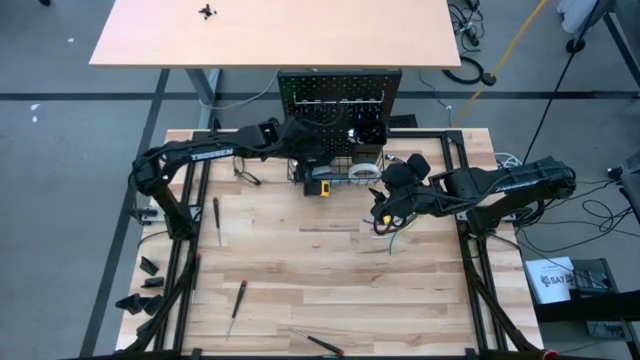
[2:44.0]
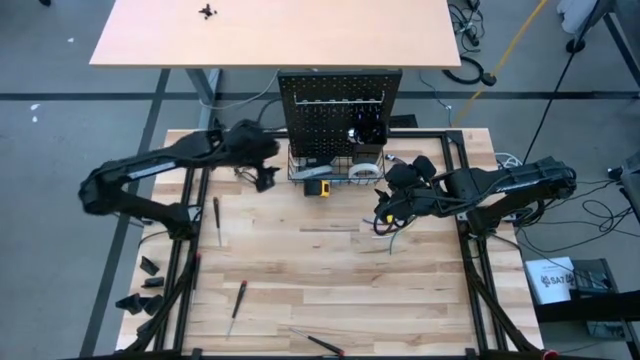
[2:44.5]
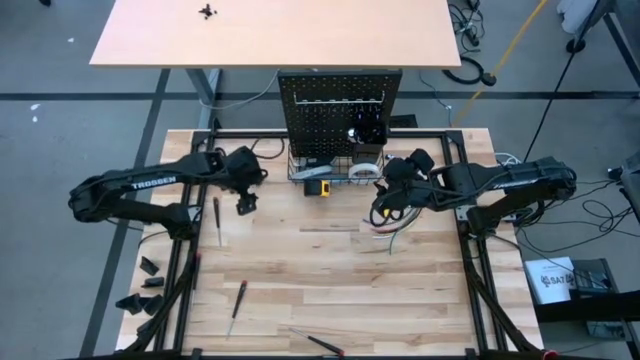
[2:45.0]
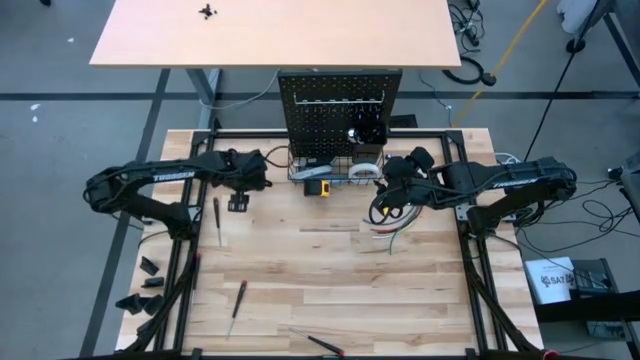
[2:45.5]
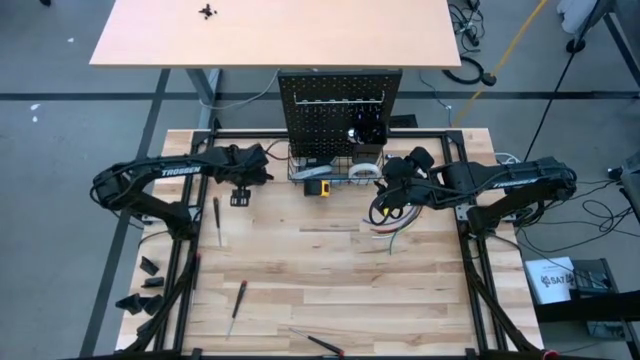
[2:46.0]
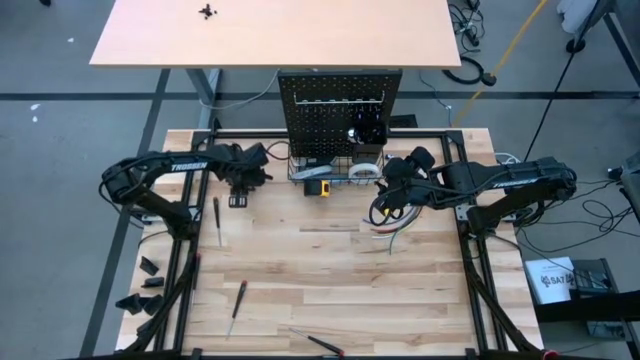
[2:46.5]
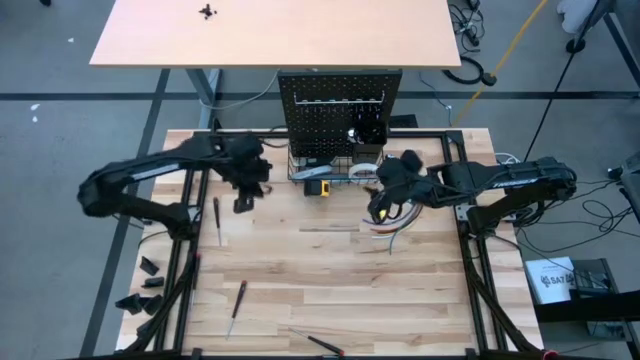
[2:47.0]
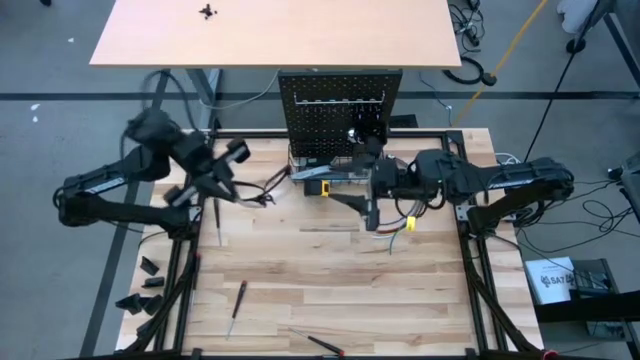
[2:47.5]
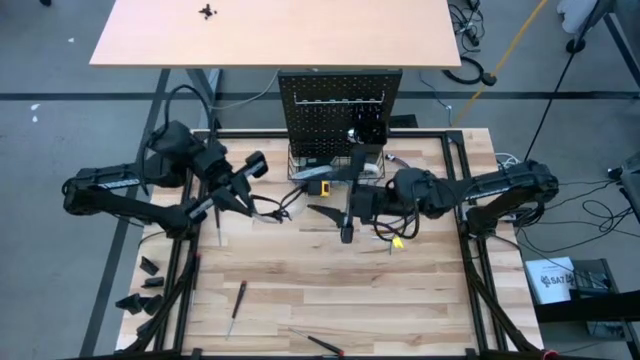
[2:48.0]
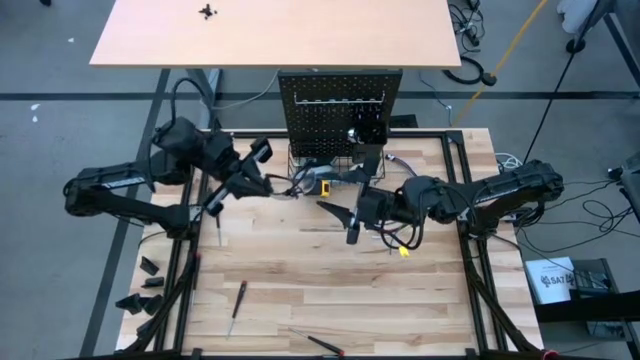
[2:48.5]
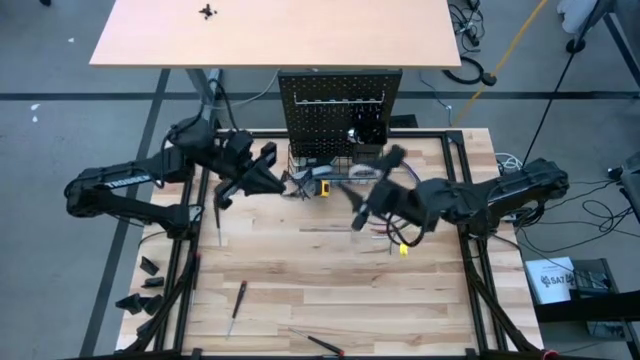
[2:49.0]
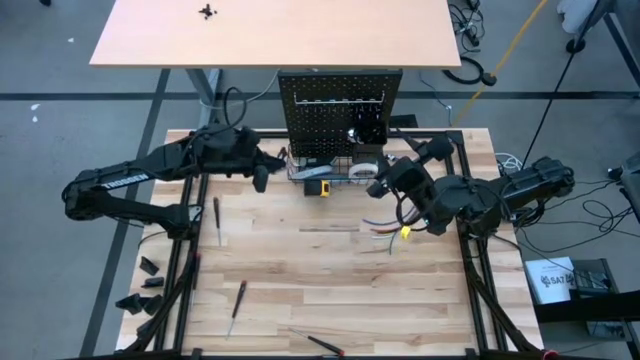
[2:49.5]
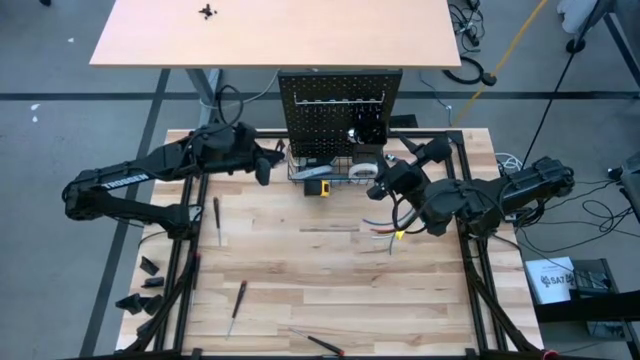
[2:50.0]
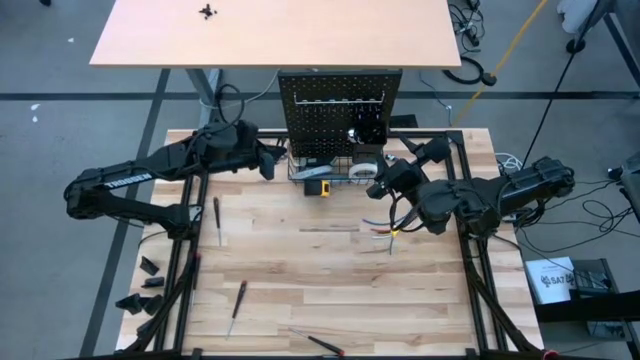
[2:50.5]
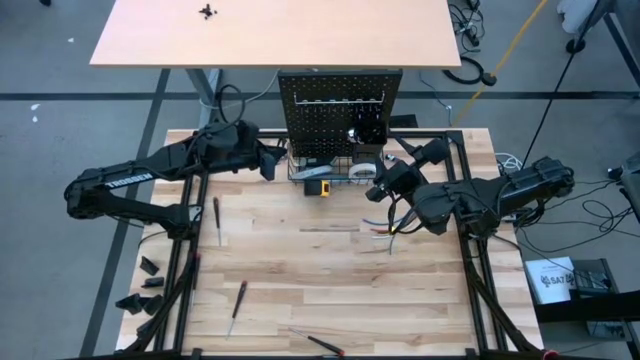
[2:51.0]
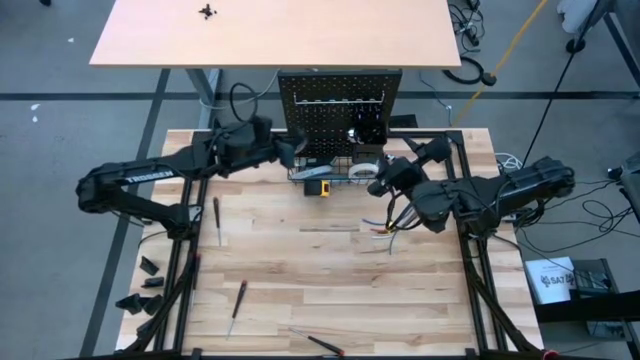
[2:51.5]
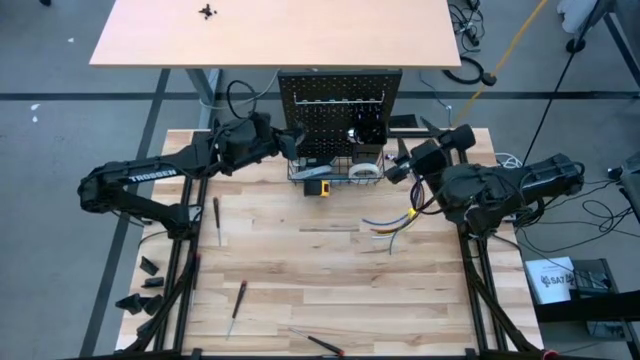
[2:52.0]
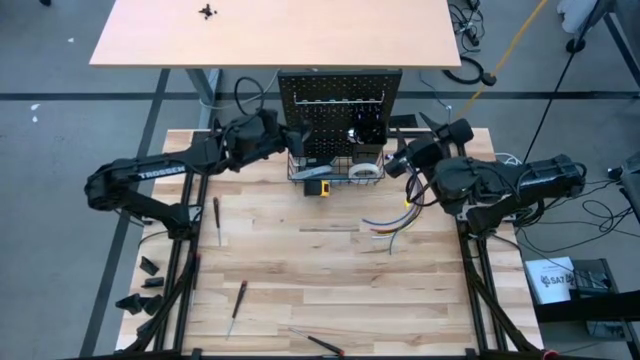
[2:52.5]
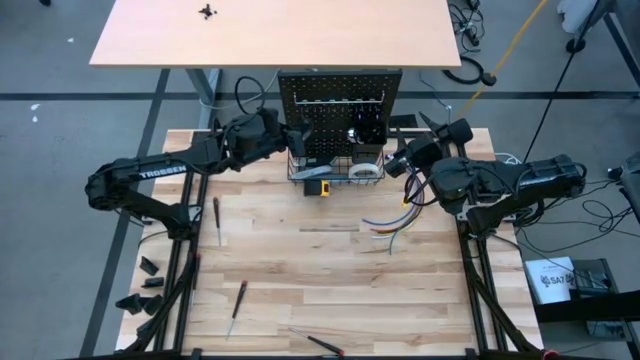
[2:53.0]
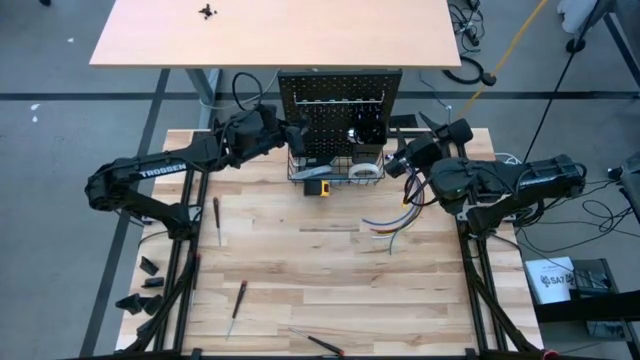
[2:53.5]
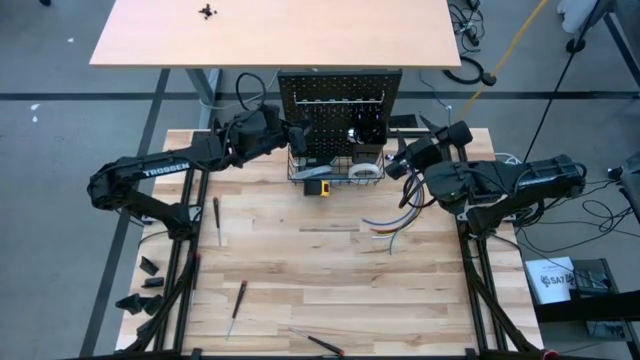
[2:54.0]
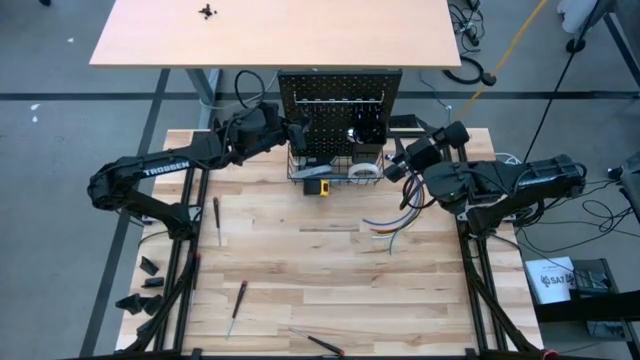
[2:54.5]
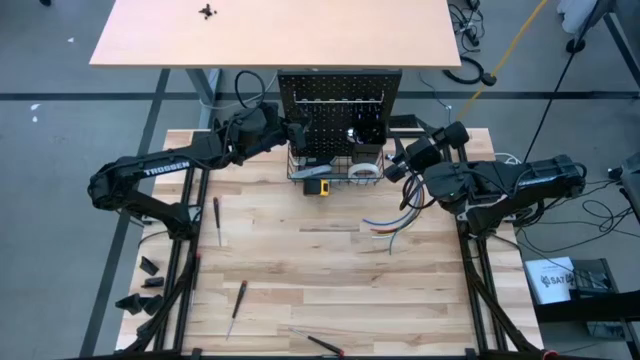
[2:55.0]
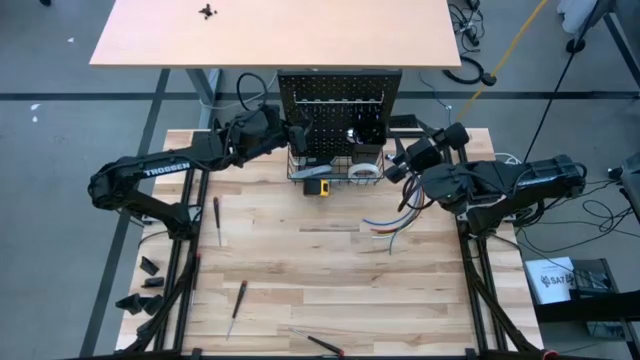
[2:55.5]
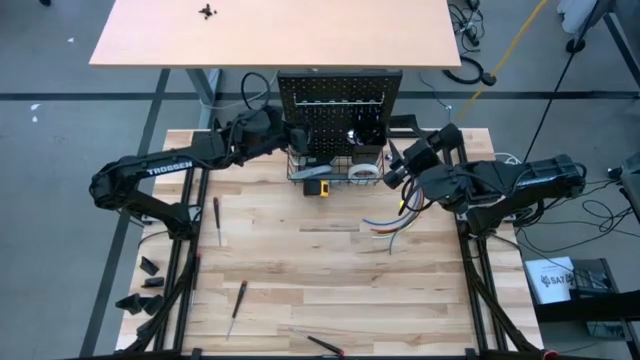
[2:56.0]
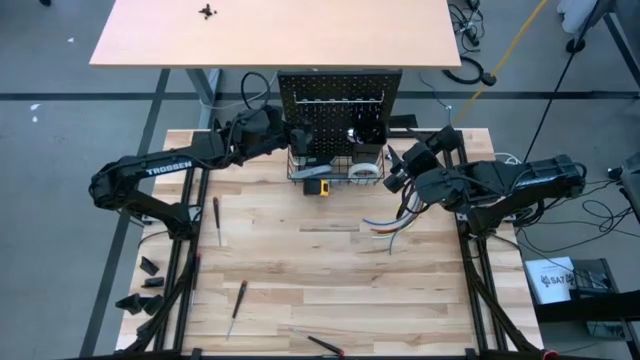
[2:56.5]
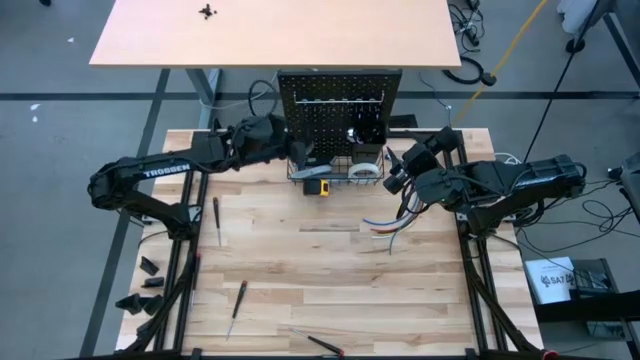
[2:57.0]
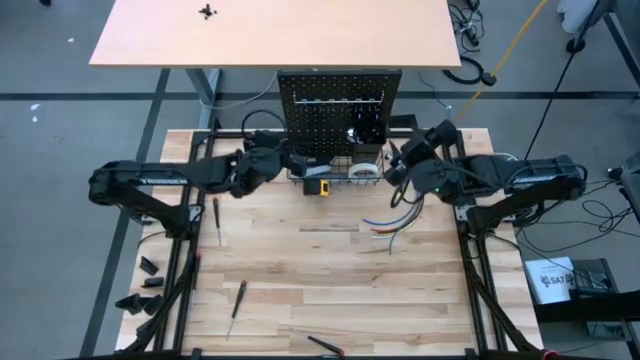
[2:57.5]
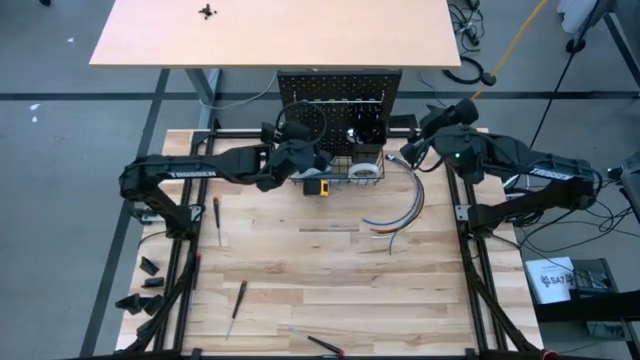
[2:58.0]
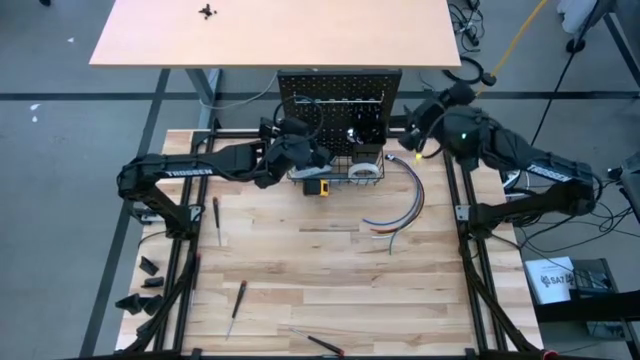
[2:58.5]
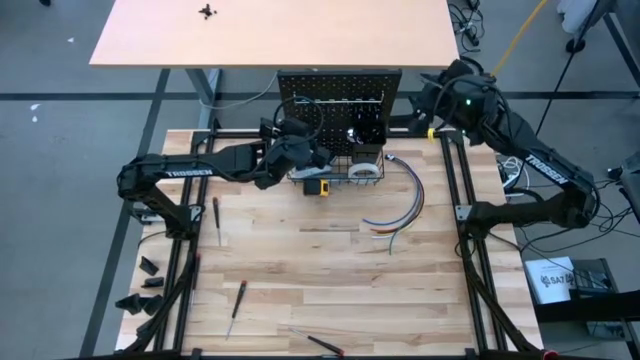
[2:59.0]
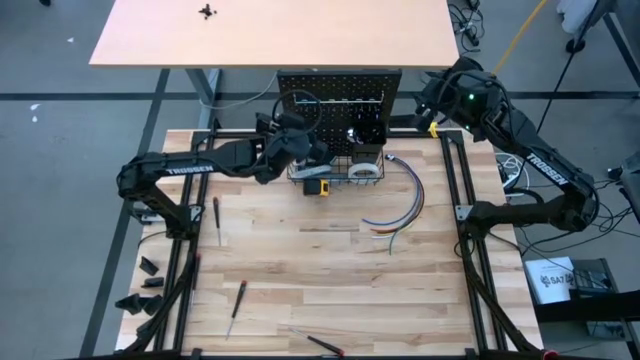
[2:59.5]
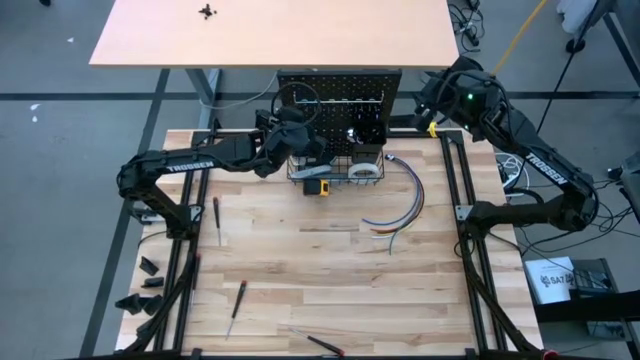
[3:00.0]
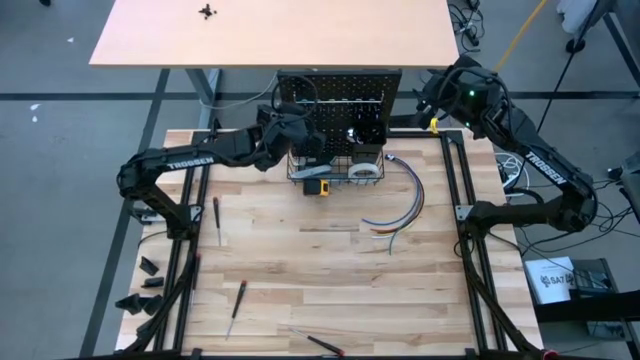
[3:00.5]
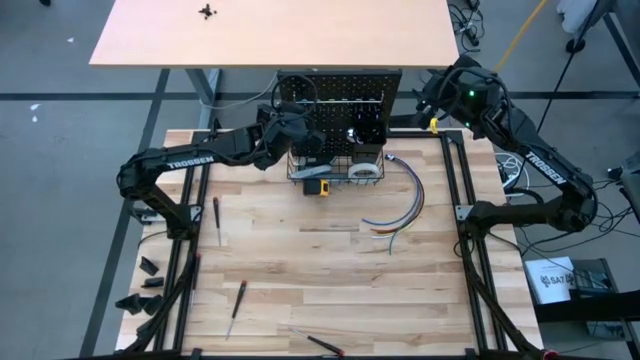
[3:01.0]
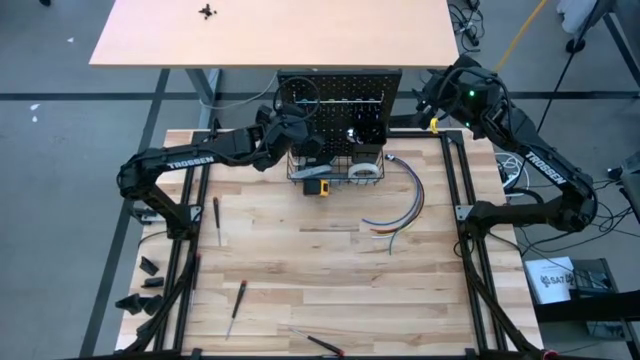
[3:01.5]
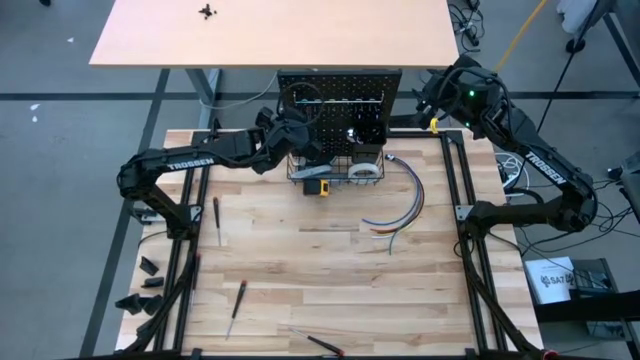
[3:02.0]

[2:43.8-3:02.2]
Task: Hang tools onto peg board
Hang the safety glasses on the pegboard

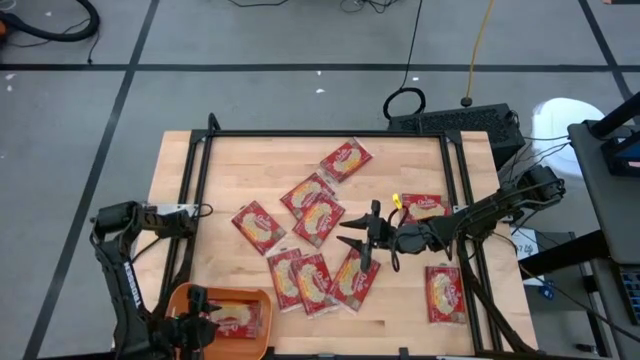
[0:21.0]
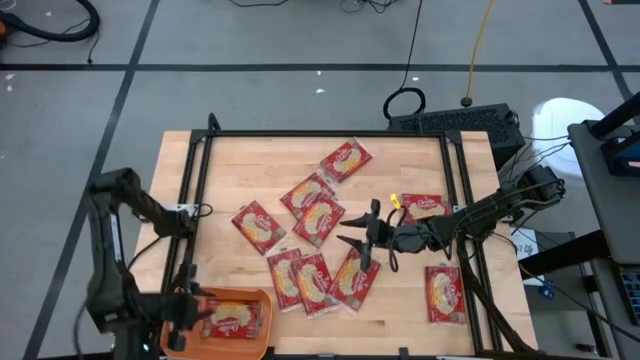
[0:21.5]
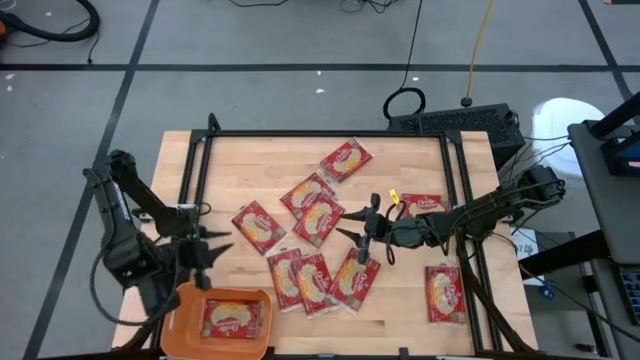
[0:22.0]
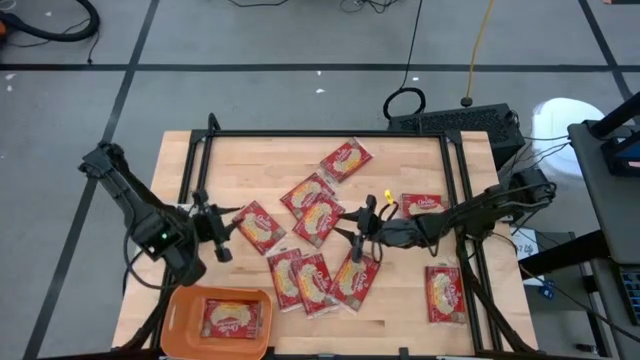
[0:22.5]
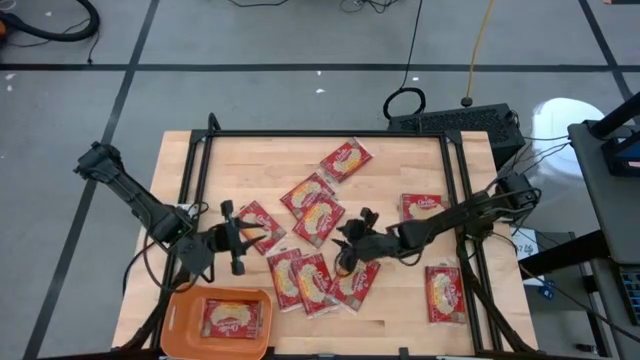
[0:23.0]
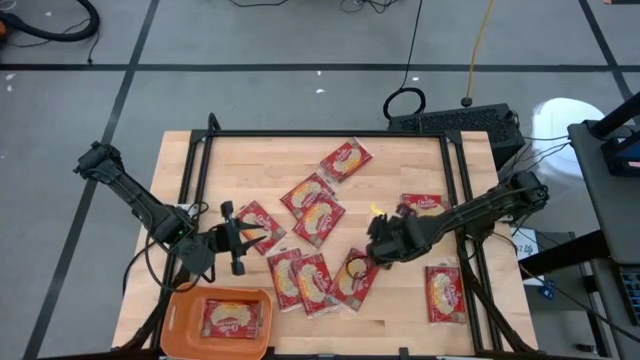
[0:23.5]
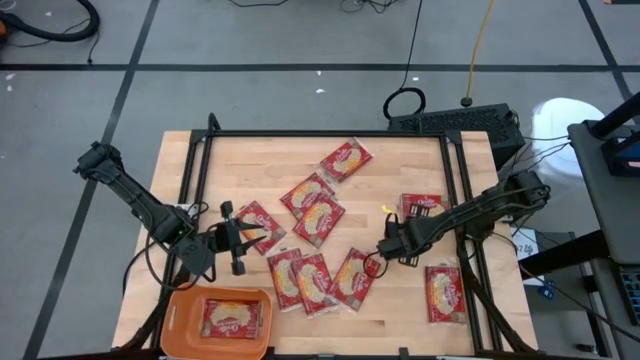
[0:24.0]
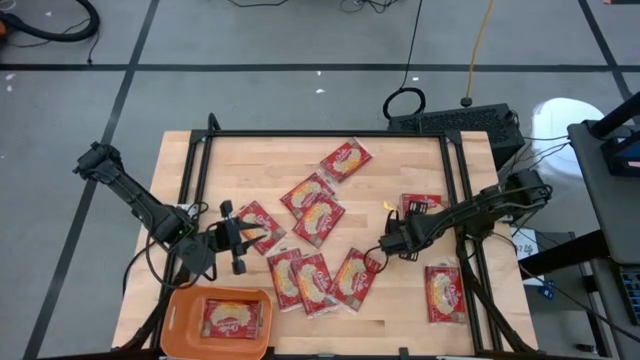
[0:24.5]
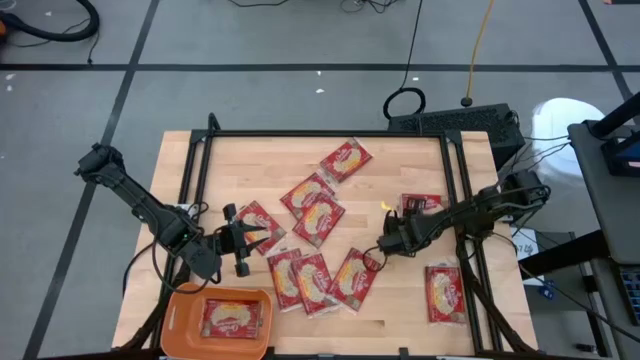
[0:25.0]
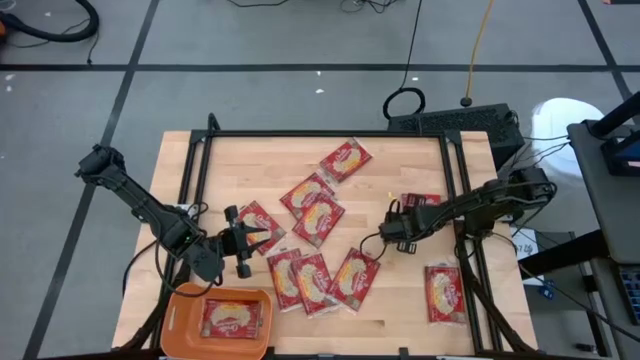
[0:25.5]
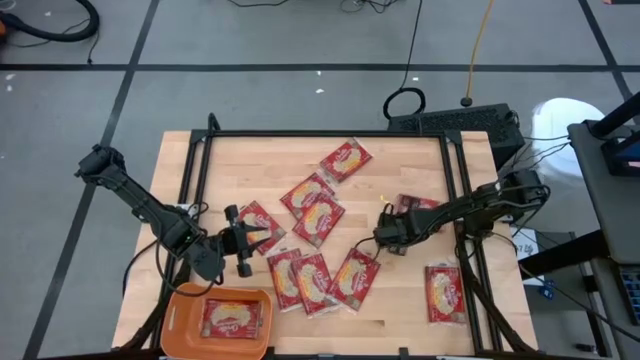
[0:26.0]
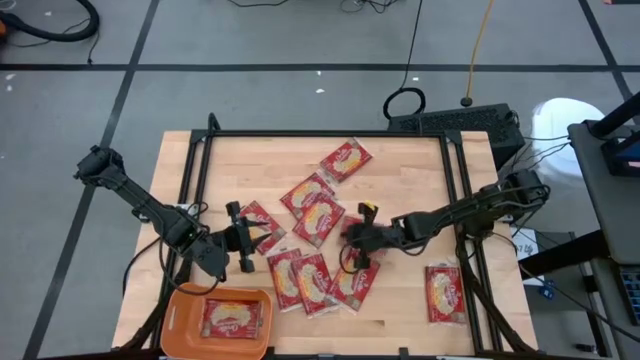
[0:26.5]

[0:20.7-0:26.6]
Task: Sort popcorn bags into baskets
Put the popcorn bag into the orange bin
